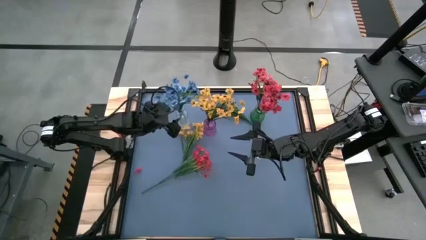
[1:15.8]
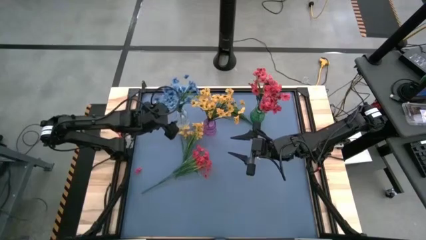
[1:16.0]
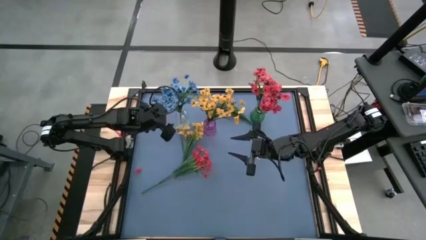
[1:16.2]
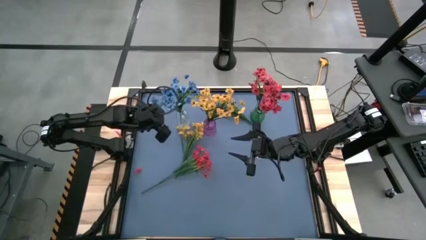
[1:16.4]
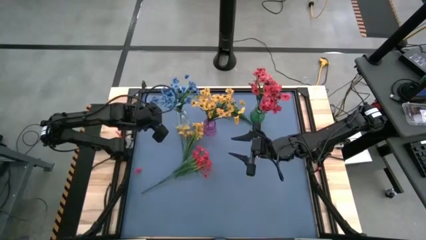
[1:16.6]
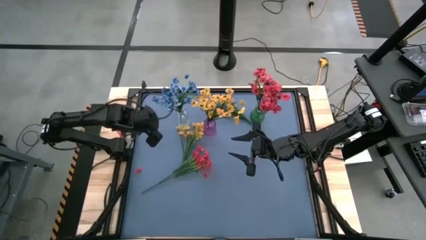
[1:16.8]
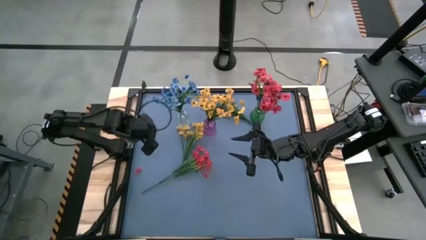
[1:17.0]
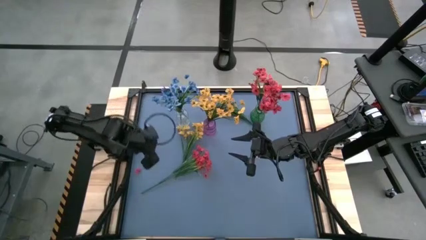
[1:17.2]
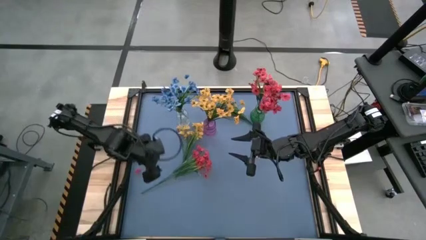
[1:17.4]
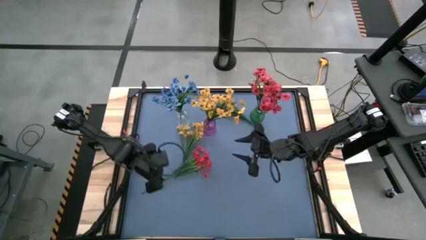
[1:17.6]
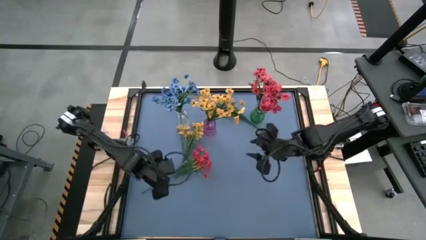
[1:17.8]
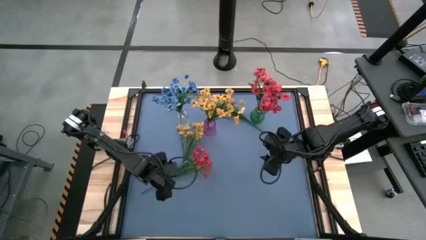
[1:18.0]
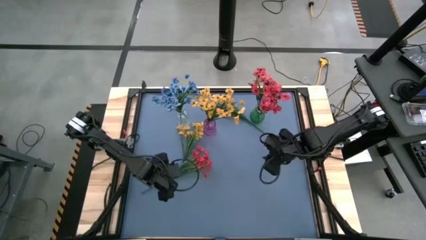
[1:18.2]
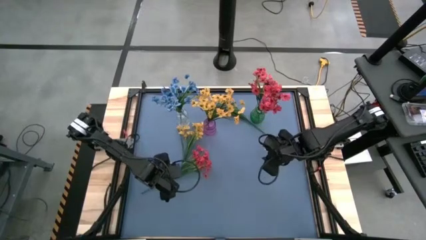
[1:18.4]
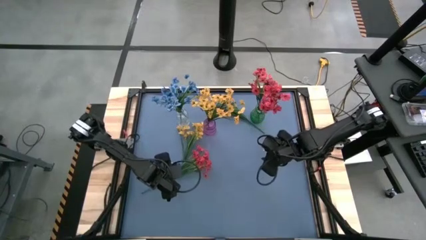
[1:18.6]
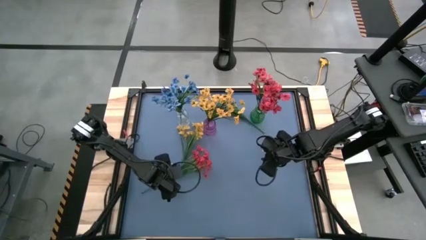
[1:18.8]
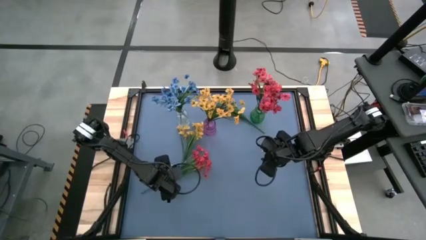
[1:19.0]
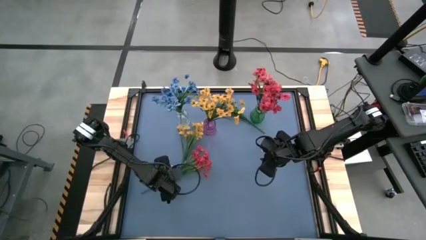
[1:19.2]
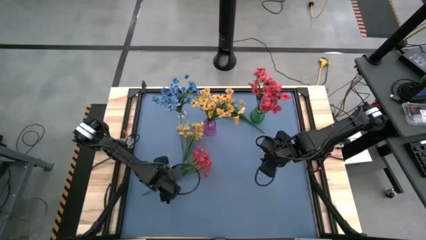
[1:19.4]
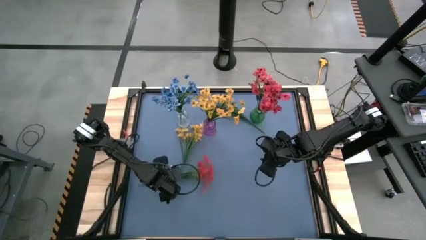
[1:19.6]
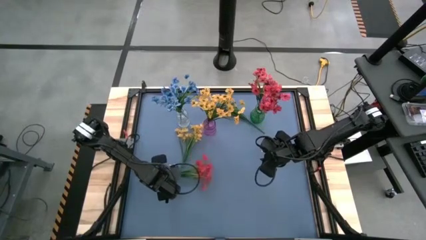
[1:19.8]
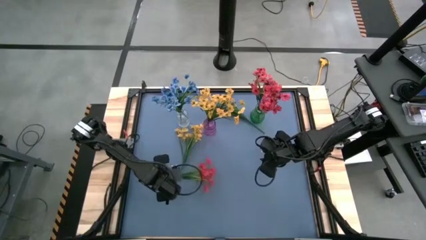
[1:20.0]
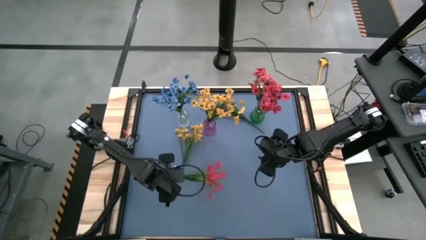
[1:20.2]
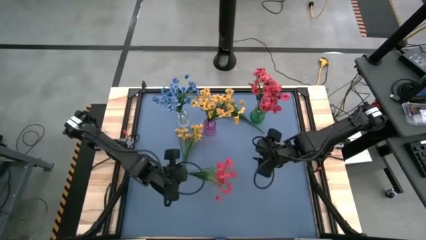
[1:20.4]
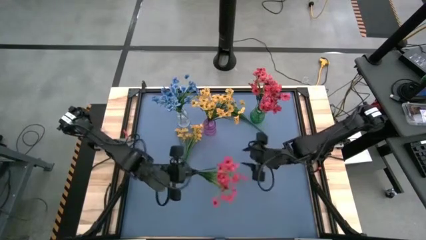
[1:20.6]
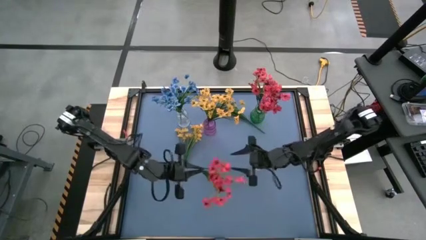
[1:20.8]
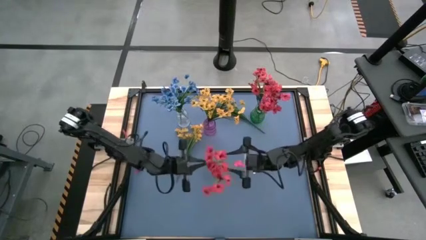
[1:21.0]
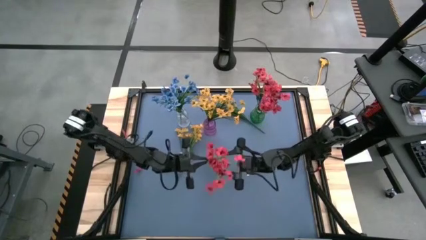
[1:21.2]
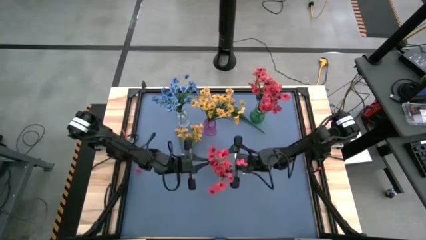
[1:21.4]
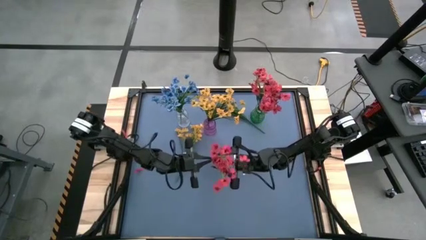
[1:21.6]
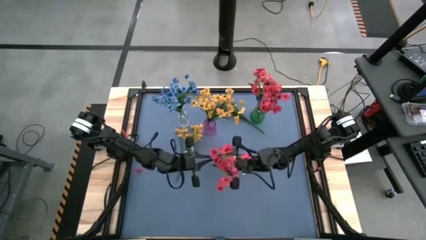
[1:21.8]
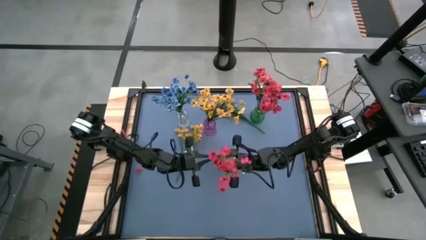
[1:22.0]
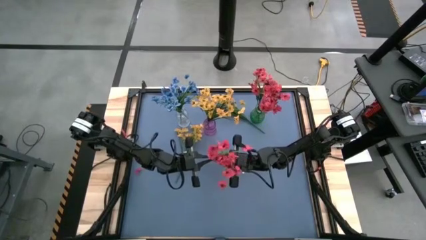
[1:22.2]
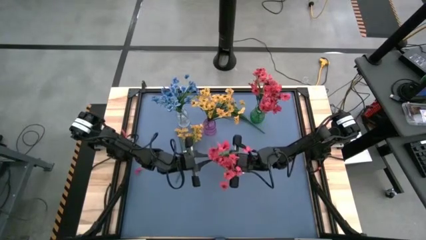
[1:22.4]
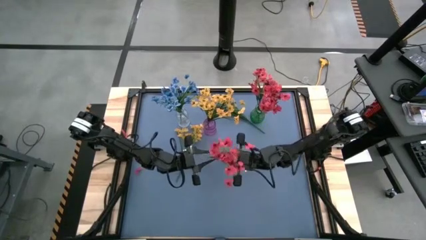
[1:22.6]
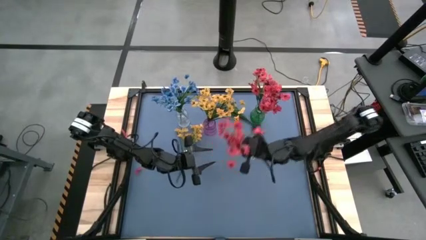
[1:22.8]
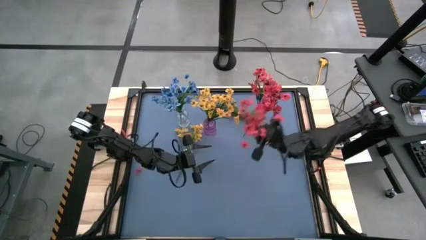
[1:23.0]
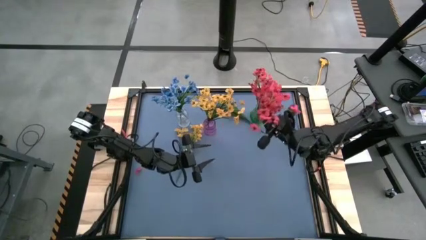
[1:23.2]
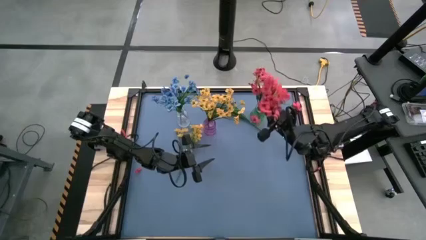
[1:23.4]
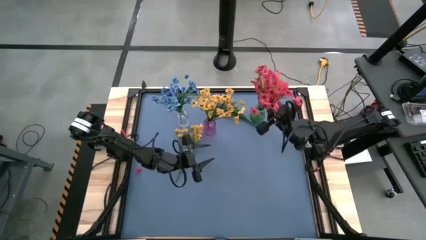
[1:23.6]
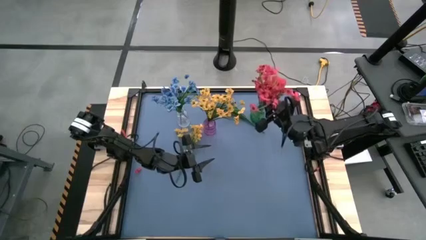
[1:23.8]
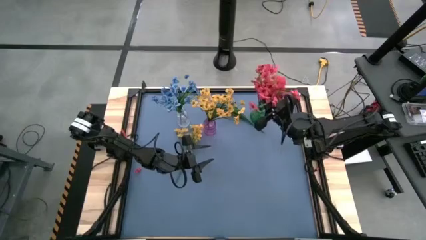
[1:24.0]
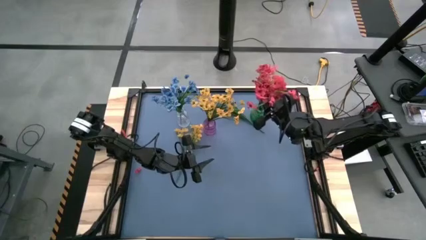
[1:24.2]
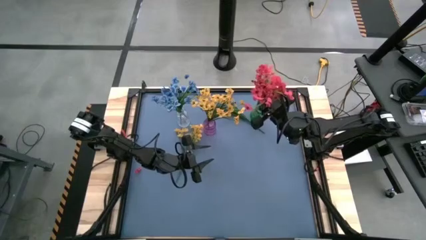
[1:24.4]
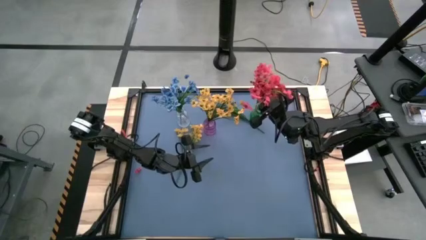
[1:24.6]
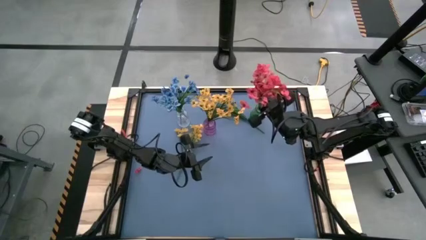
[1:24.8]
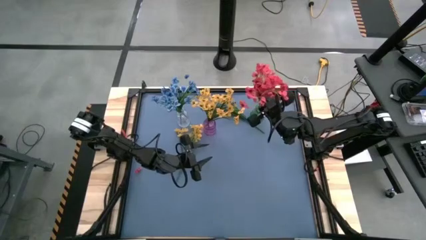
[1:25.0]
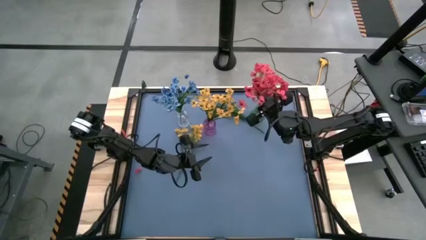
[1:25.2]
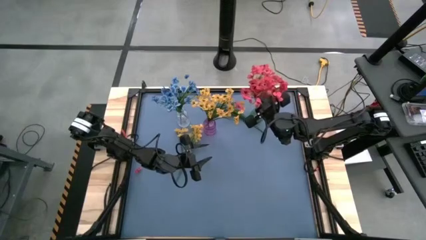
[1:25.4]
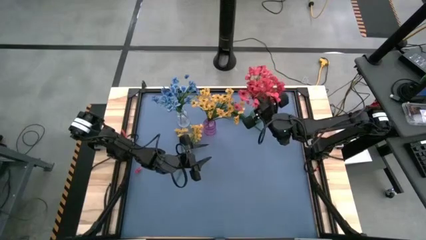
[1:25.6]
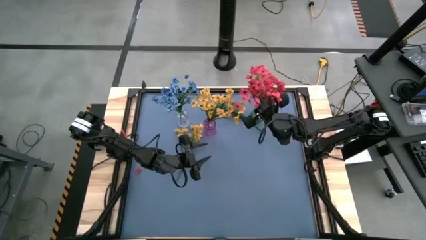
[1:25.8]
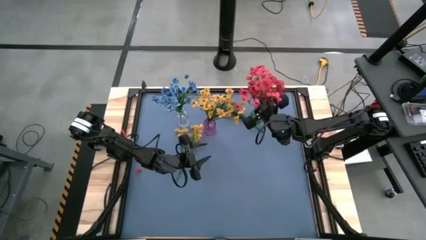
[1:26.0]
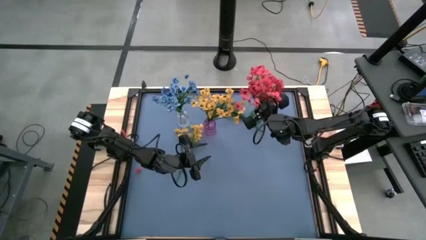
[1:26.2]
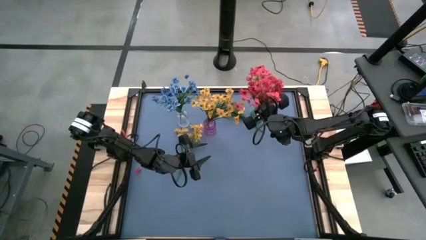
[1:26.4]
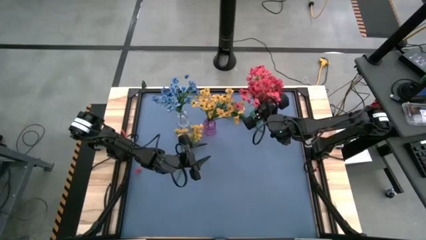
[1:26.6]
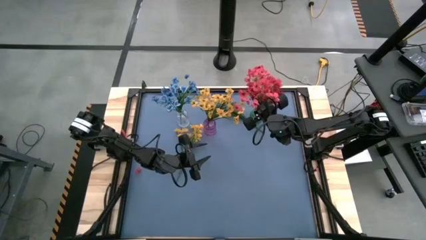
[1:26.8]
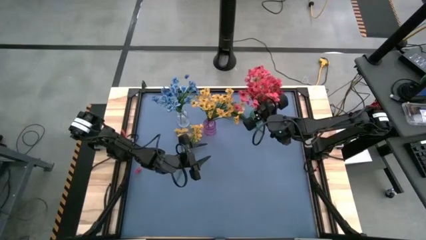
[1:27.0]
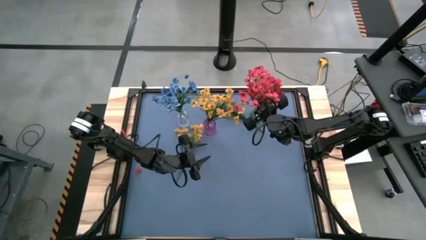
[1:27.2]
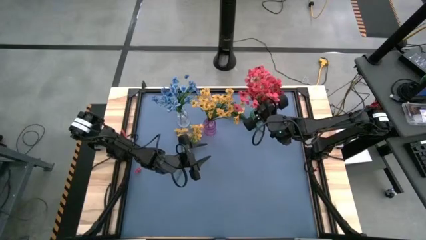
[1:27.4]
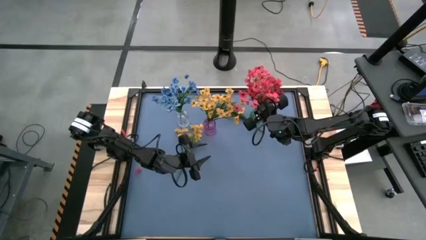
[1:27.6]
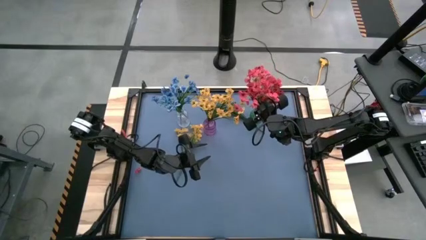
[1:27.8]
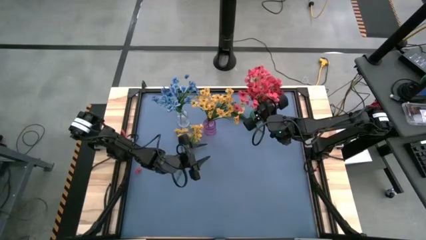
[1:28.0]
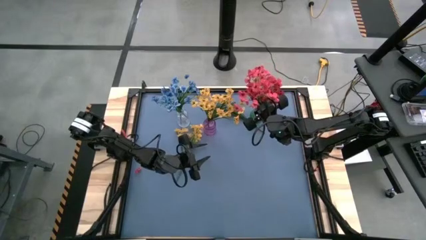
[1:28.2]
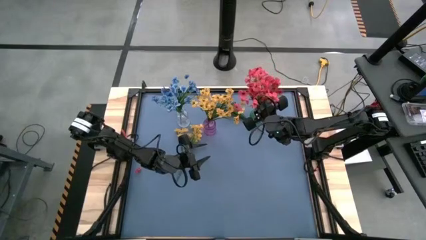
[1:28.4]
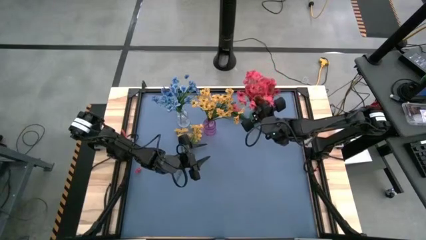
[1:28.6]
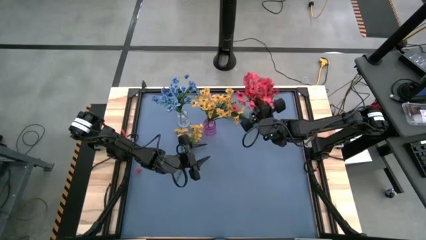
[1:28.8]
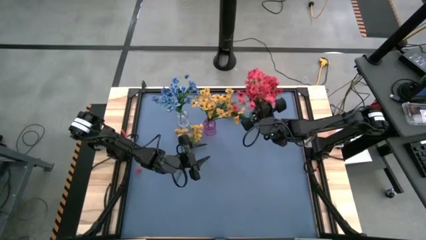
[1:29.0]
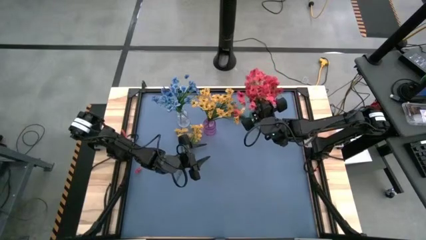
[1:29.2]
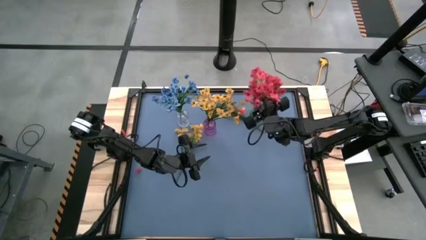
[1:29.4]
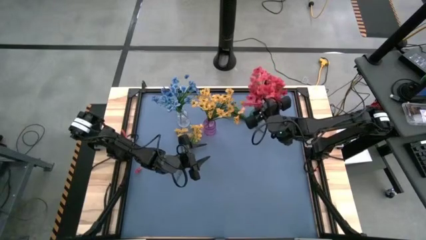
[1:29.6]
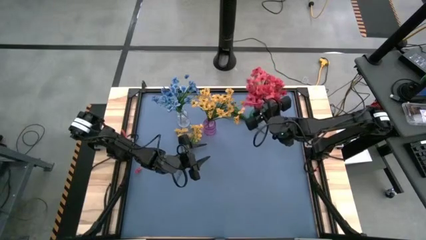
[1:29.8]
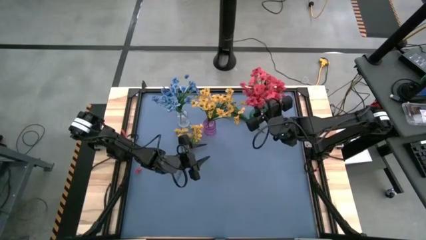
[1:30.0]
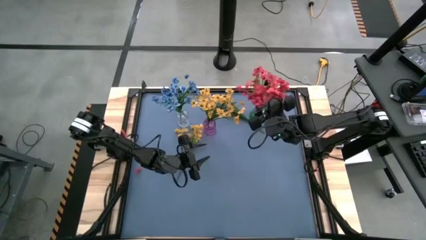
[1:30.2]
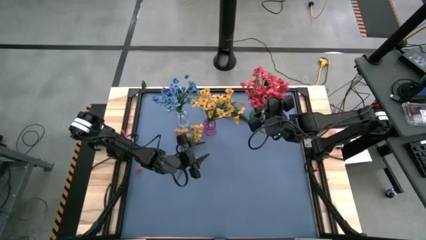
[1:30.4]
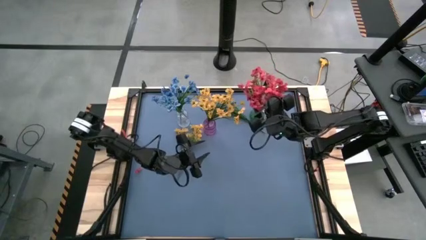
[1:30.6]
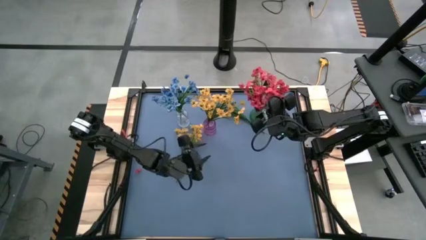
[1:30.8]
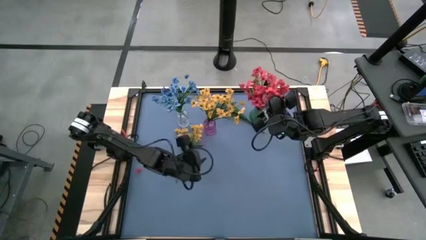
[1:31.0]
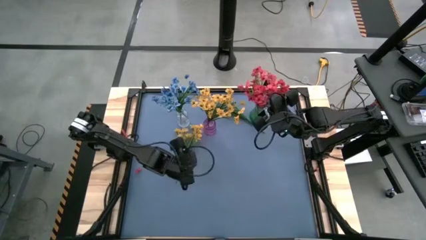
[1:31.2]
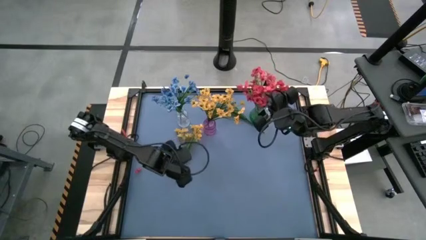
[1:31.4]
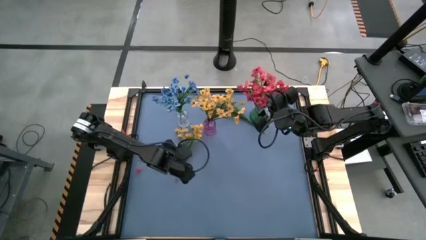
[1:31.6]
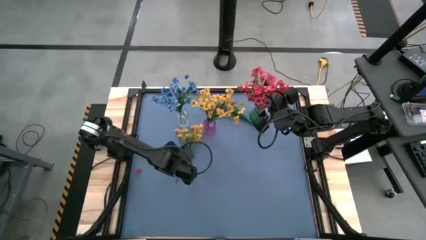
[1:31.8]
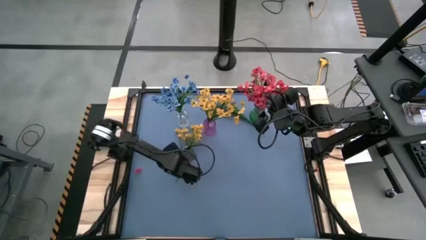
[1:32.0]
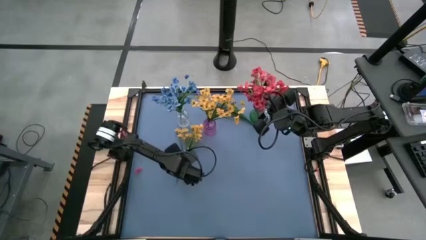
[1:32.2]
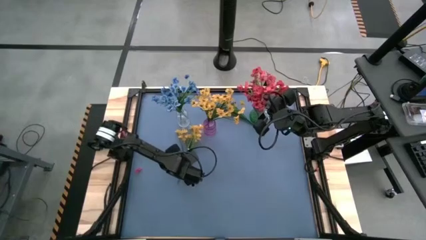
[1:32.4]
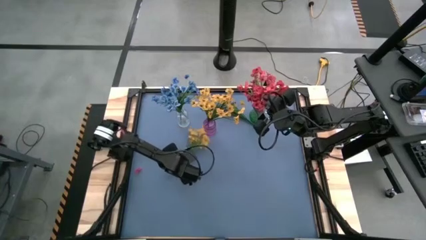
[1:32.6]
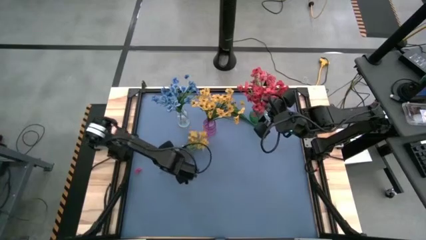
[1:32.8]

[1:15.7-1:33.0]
Task: Sort flowers into vase by color
Put the red flowers into the green vase
